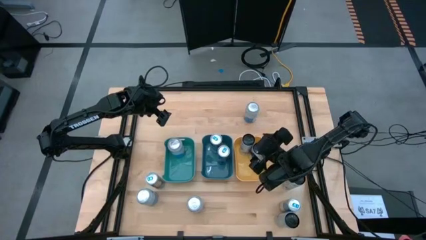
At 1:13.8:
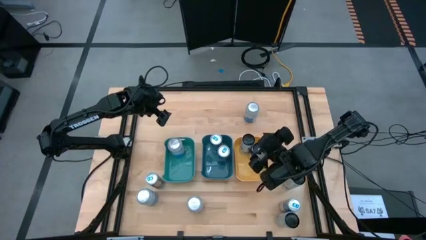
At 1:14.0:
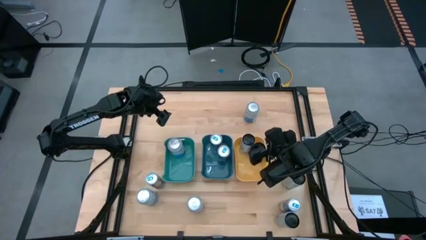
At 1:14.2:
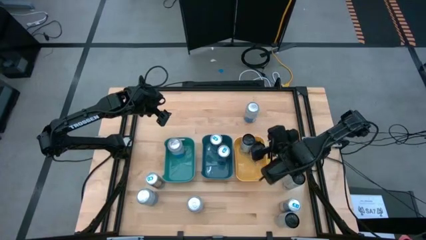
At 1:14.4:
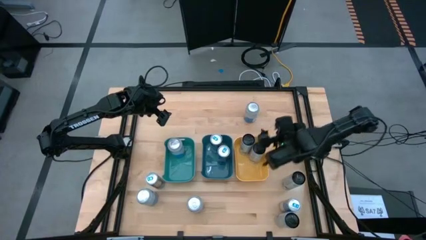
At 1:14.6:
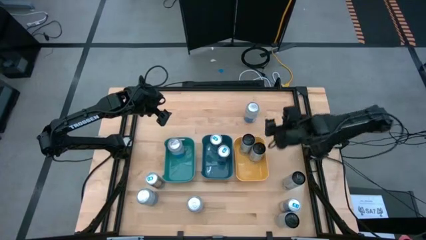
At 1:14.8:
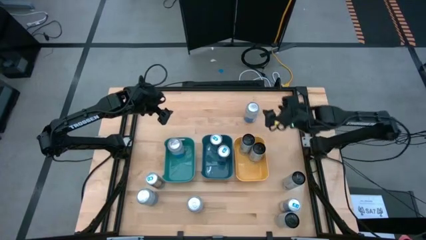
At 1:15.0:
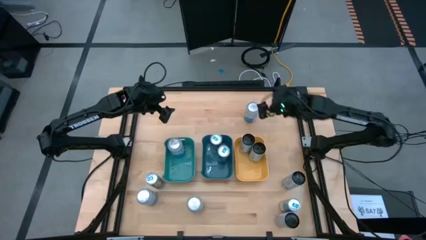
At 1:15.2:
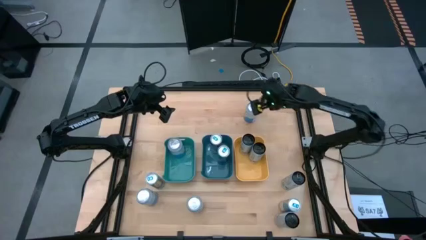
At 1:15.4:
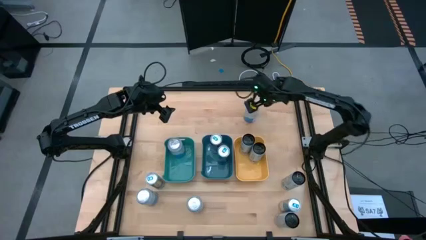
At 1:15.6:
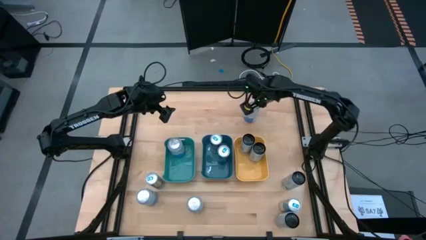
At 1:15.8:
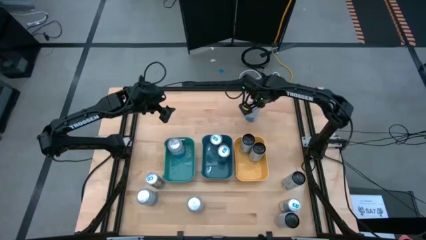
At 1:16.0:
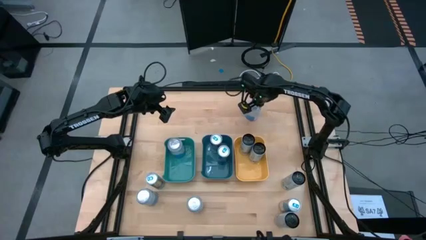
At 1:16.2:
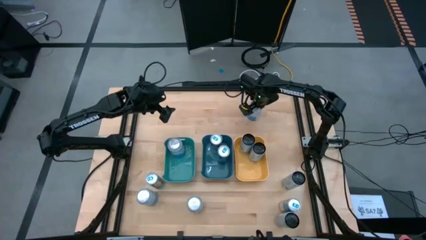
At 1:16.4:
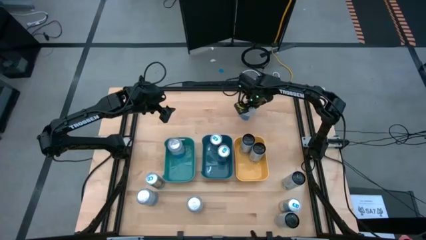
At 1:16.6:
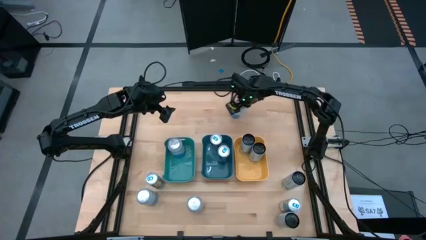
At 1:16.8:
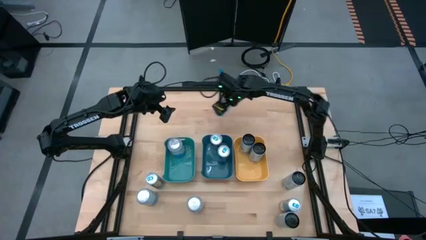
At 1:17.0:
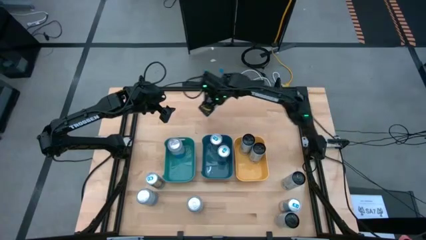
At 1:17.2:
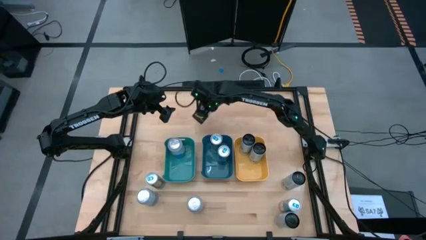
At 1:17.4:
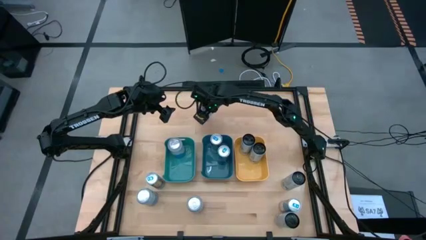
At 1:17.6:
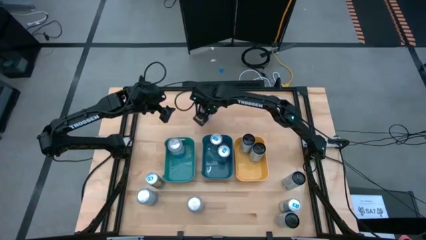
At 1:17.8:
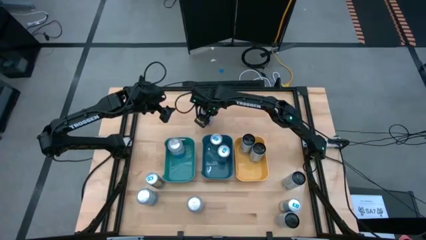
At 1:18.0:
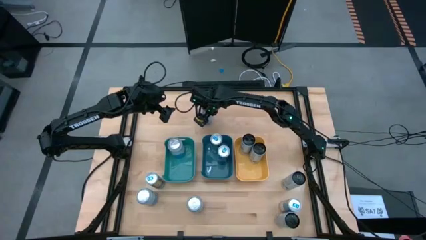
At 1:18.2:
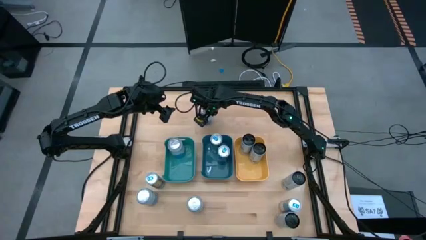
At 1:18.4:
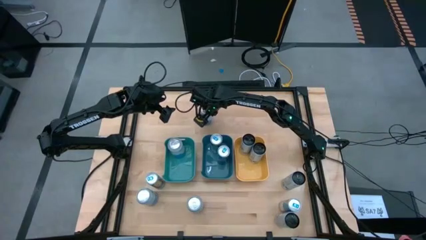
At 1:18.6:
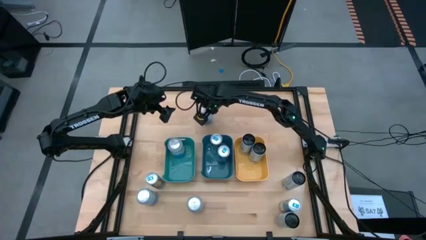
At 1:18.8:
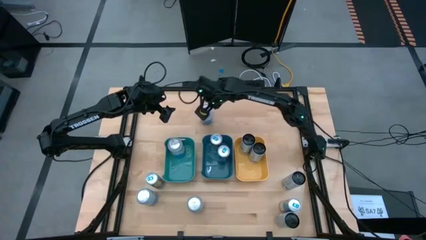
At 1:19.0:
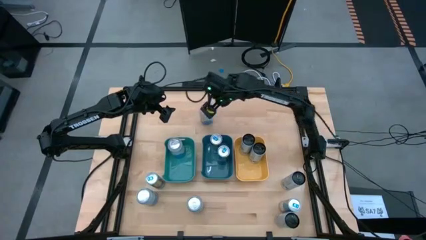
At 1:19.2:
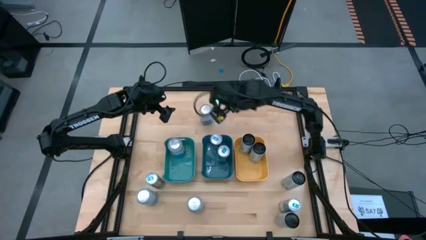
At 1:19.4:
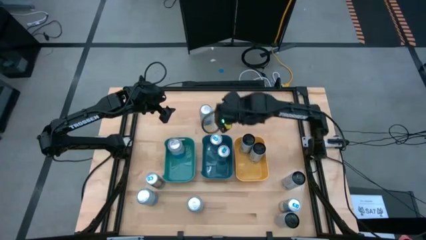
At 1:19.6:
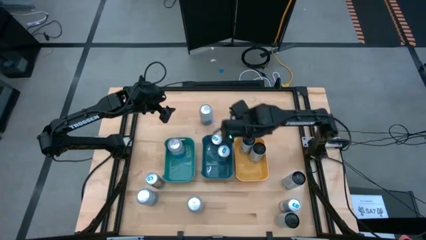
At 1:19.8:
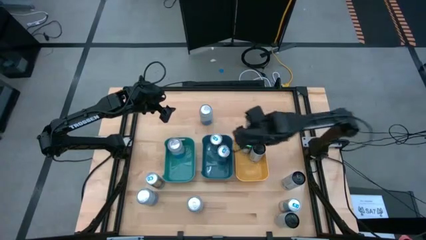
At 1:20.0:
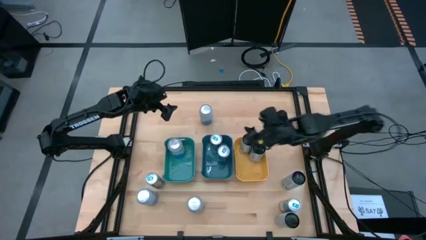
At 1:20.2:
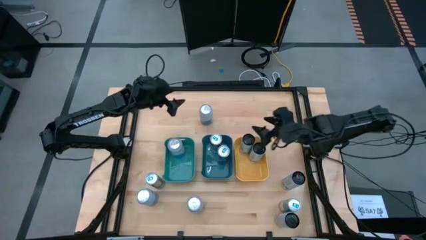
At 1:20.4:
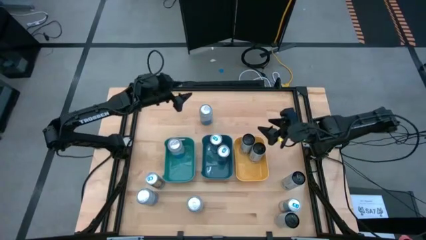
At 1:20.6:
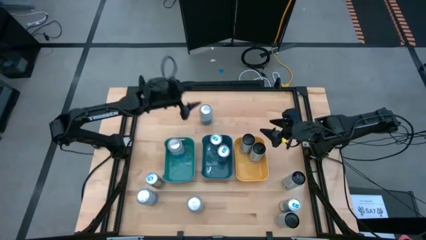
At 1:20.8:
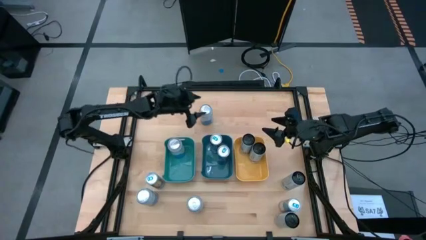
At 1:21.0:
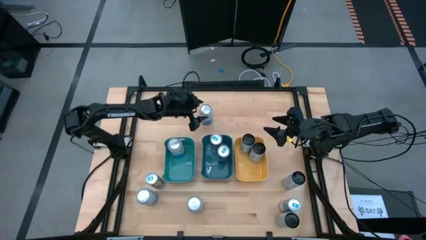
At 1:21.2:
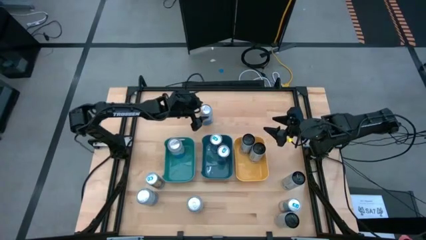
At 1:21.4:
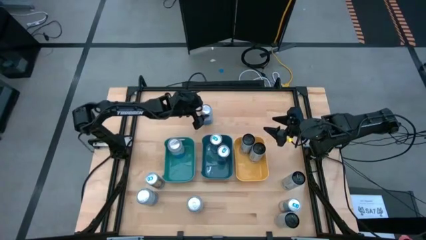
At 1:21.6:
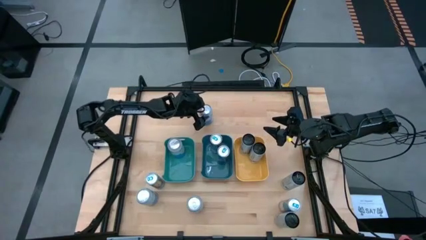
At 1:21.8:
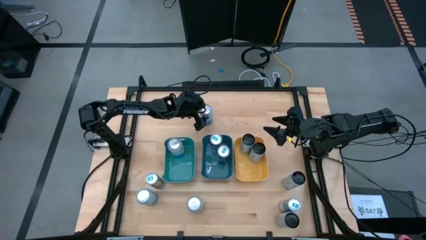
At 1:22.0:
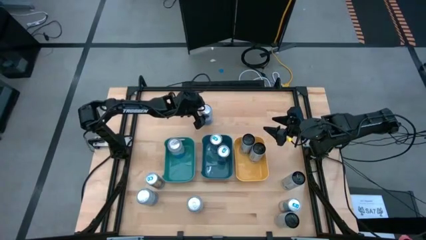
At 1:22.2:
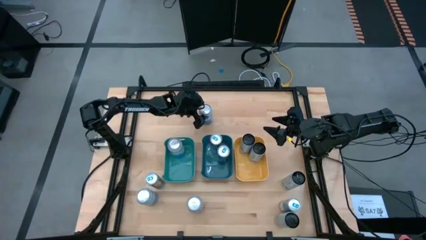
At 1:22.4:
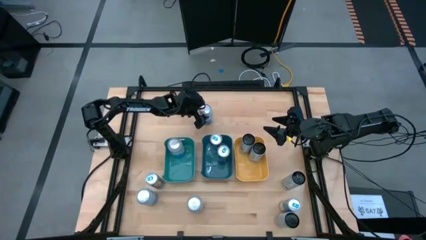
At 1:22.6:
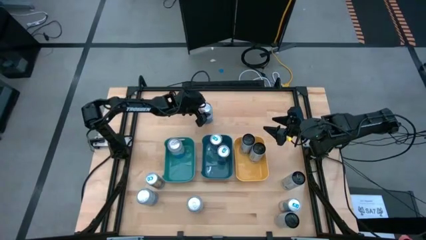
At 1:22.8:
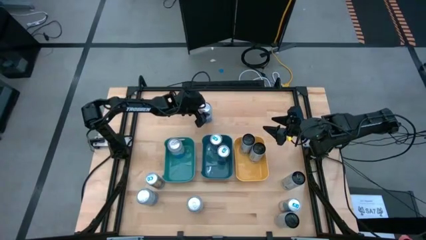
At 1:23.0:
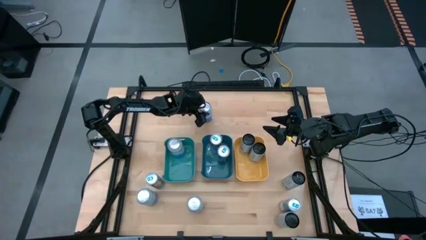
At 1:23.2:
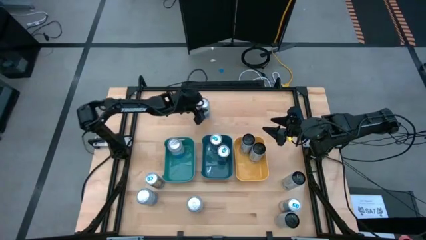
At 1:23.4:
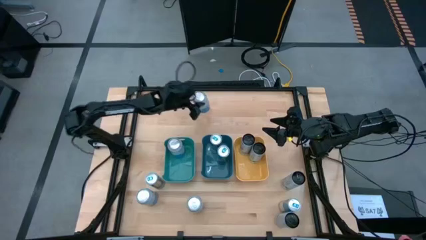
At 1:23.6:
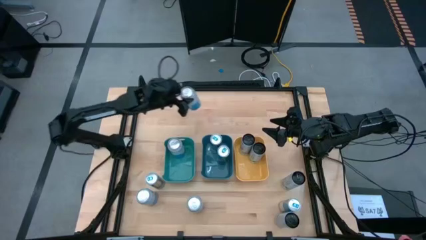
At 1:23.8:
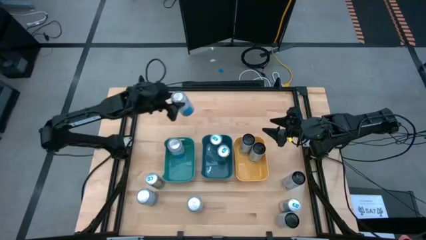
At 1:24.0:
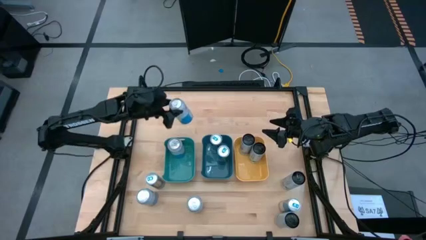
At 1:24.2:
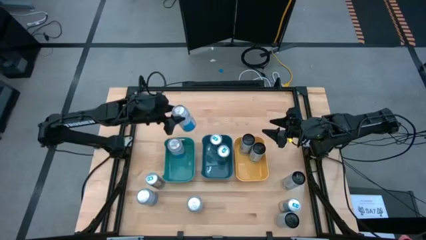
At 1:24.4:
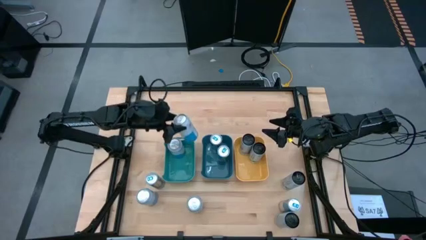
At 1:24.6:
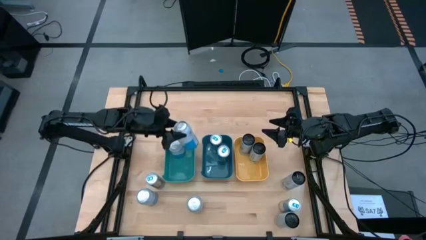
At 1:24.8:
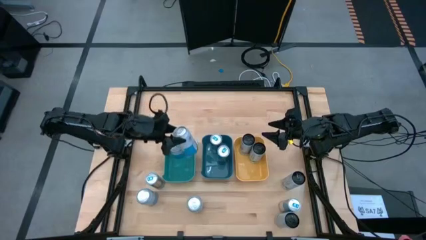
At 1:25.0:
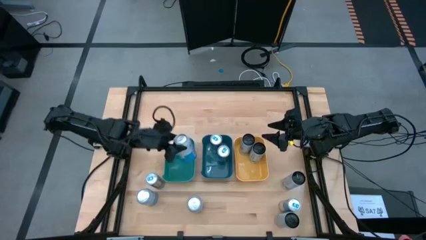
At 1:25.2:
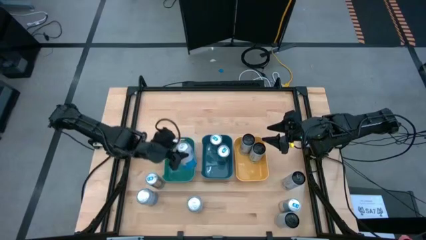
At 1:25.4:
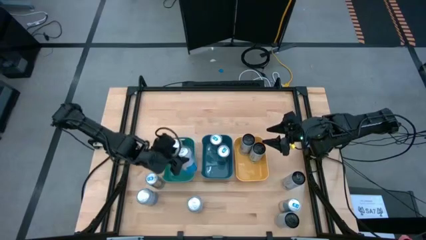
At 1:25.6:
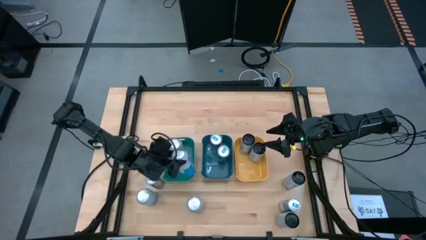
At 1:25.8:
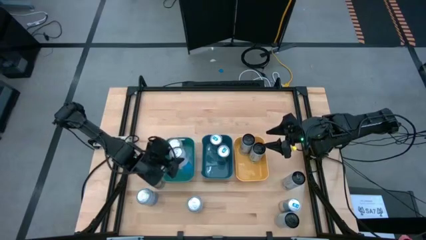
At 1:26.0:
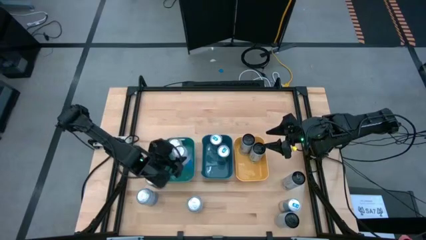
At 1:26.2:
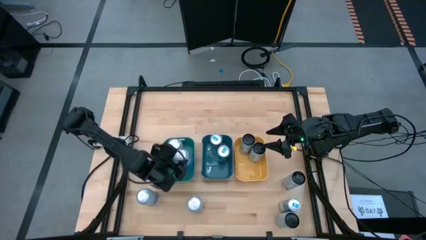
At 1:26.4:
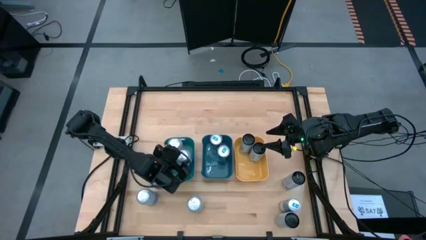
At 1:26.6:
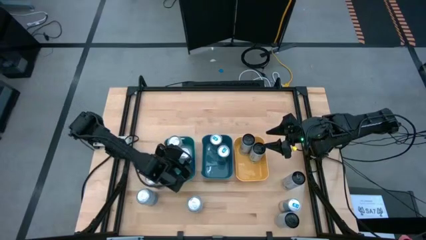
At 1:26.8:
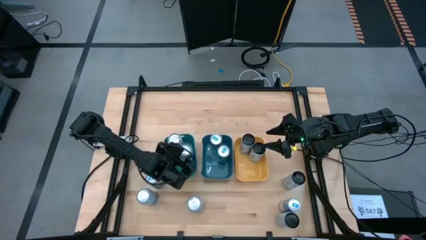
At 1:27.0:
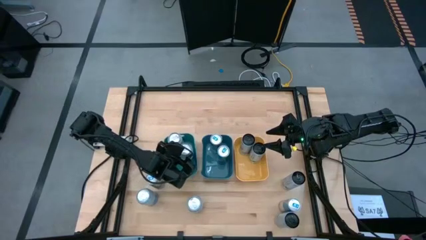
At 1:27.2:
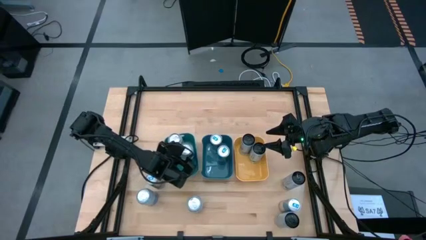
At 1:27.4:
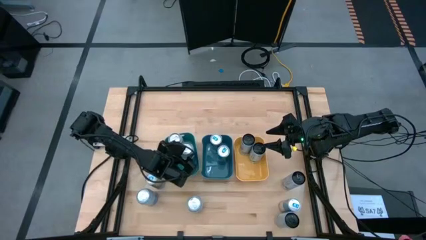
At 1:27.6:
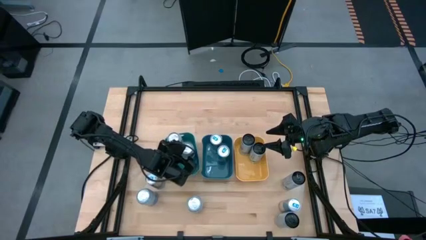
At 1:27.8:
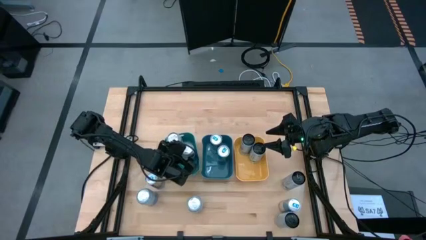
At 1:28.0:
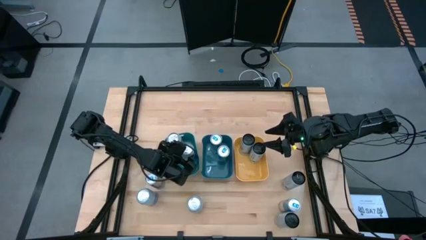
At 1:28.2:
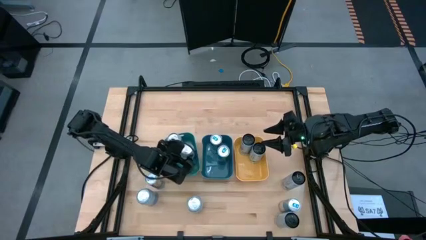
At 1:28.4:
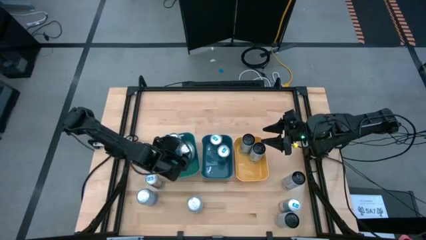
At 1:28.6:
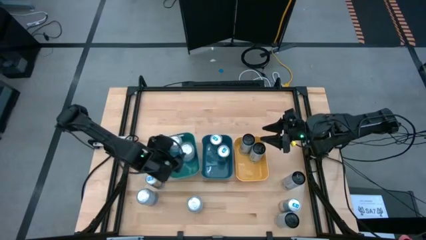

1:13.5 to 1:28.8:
Task: Sort soda cans
Put the blue-white soda can into the green bin

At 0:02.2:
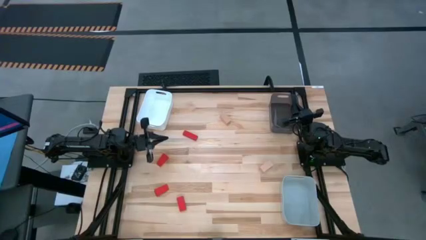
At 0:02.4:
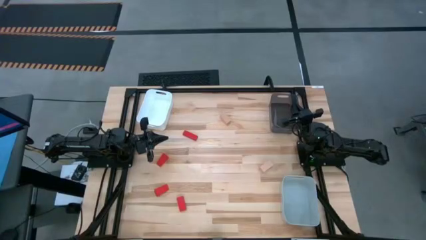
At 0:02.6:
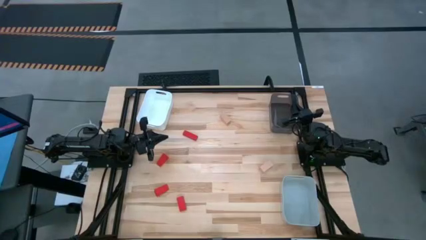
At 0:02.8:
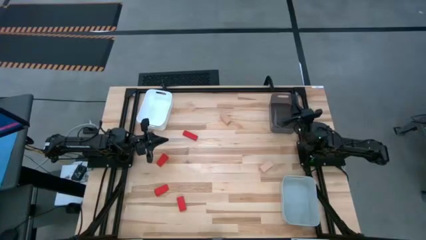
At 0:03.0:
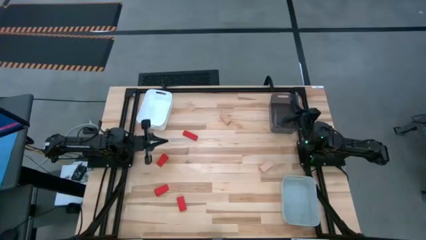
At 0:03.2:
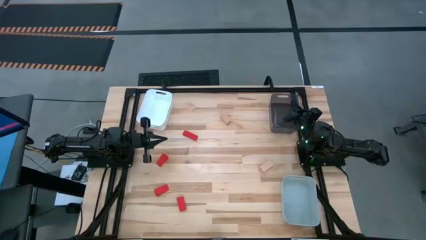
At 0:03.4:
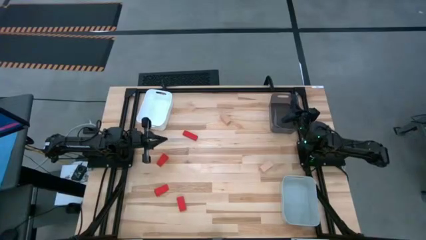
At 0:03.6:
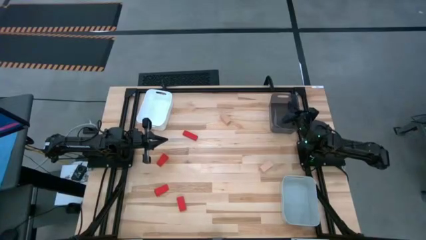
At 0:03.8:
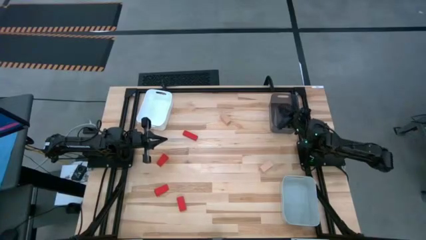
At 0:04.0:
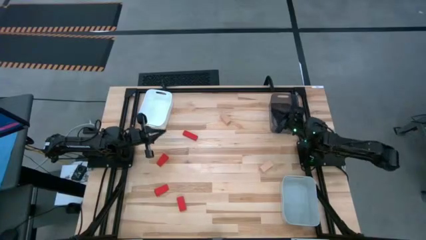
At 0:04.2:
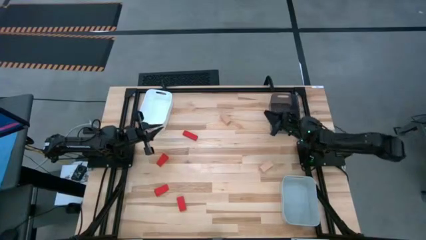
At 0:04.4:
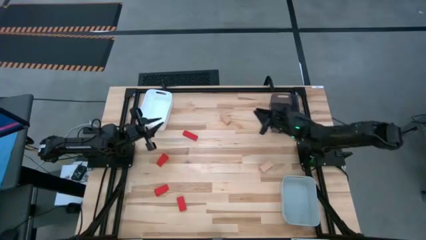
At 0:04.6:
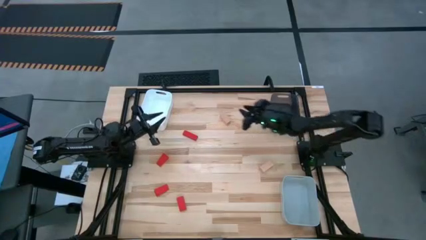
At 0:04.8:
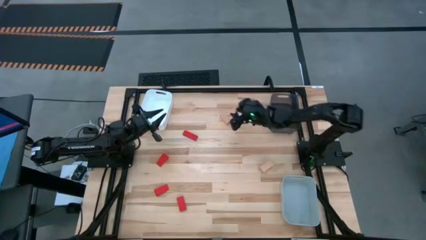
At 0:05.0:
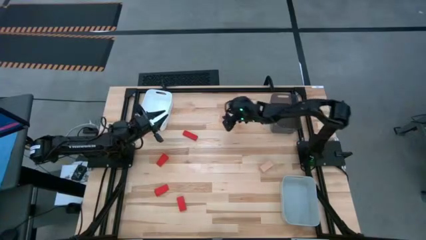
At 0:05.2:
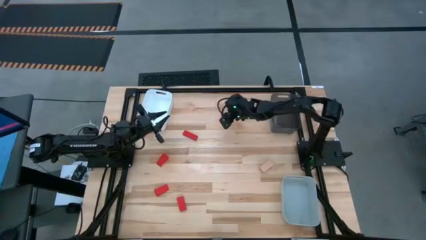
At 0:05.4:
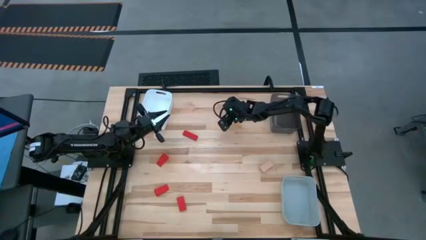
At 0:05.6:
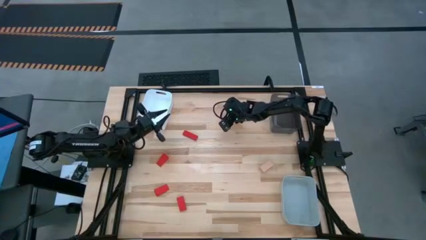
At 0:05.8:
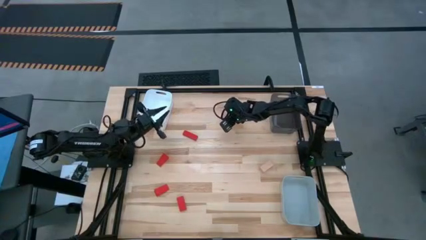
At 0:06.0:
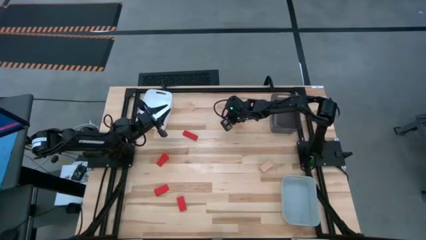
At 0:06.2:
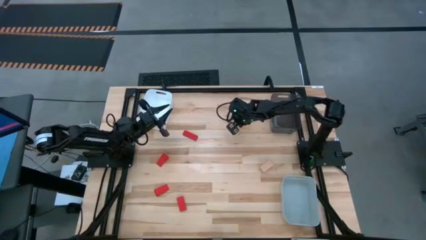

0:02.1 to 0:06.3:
Task: Sort & place blocks by color
Put the brown block into the black bin
